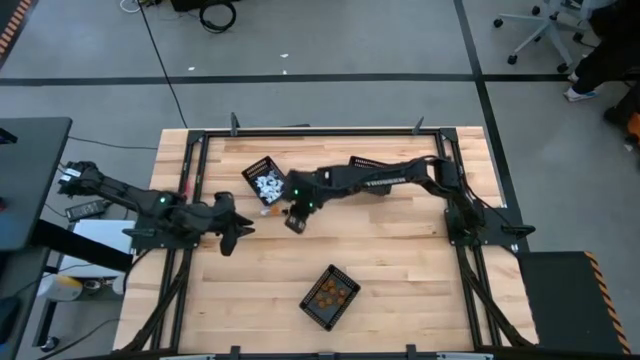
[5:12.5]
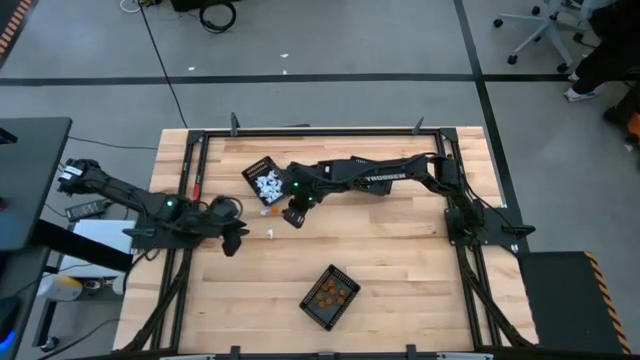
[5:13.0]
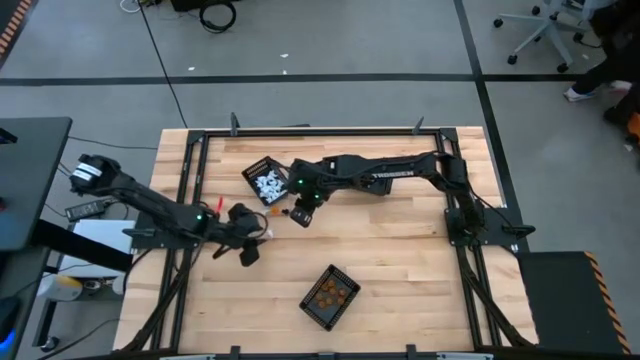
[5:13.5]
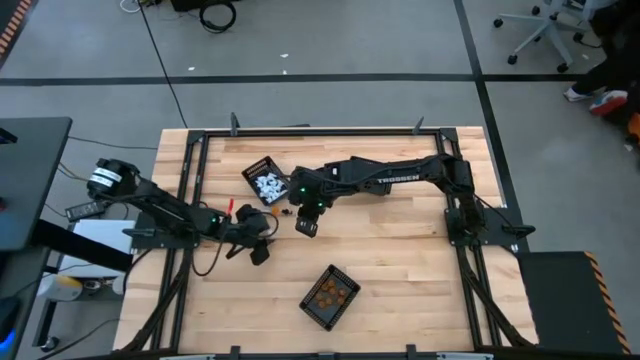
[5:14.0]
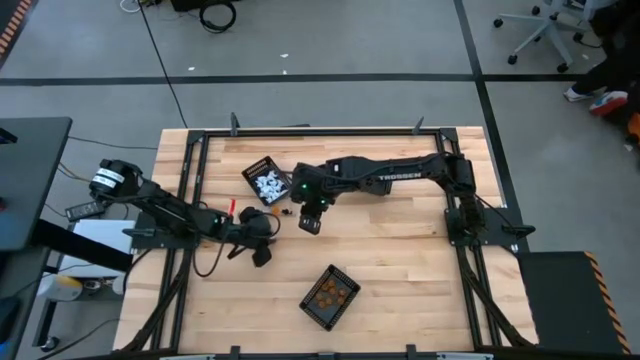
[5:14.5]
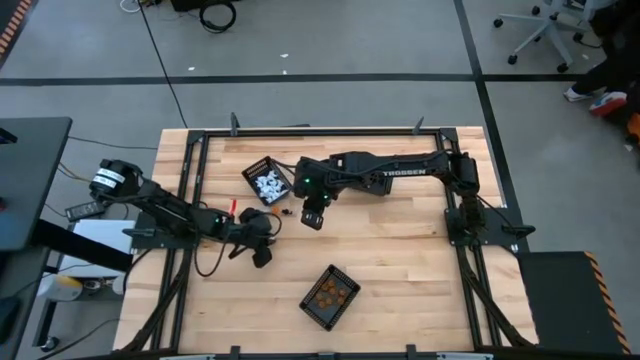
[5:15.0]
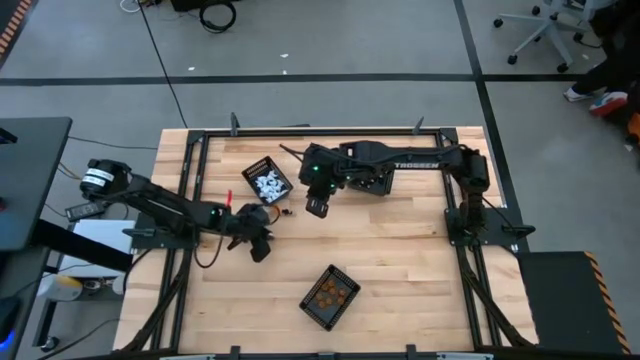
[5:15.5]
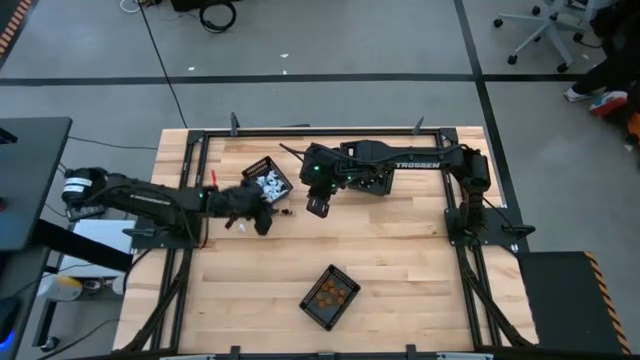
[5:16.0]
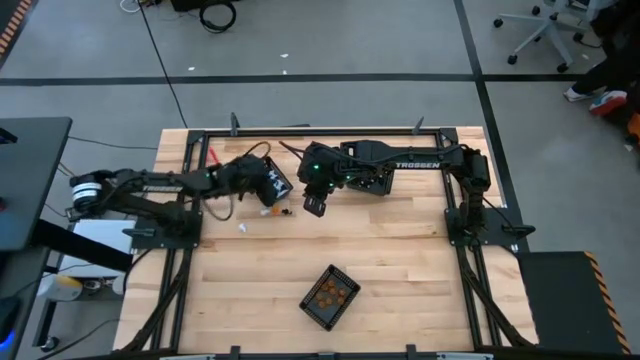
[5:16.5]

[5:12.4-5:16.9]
Task: Sort Halloween decoration
Put the white ghost toy into the top left black basket

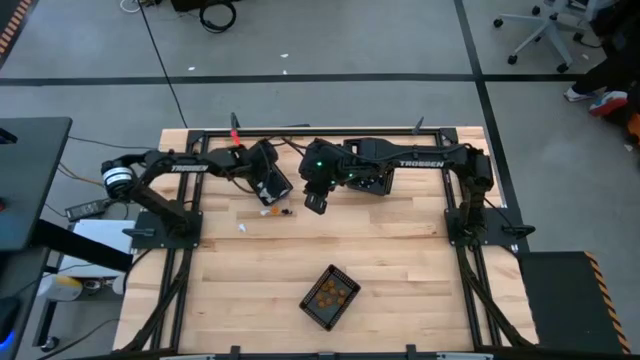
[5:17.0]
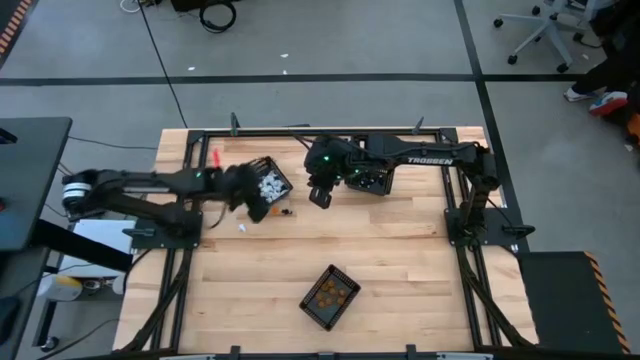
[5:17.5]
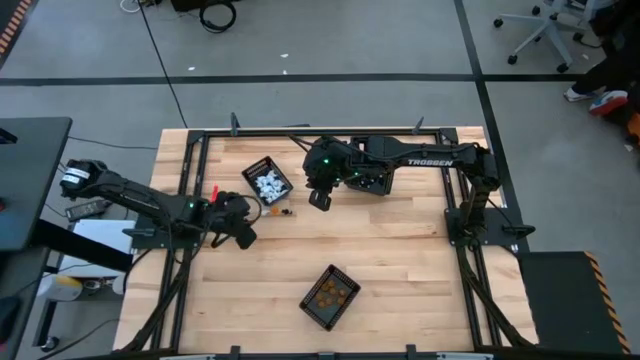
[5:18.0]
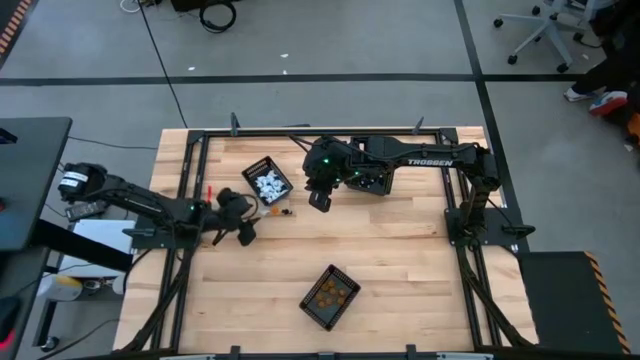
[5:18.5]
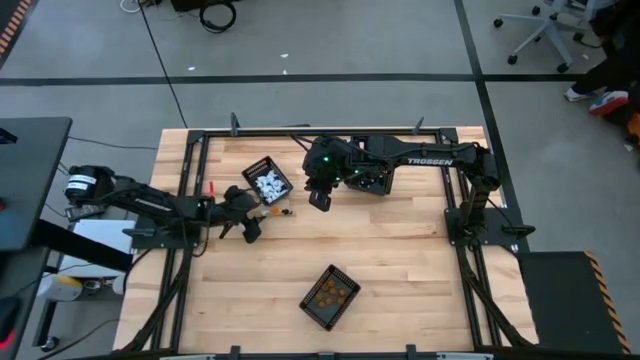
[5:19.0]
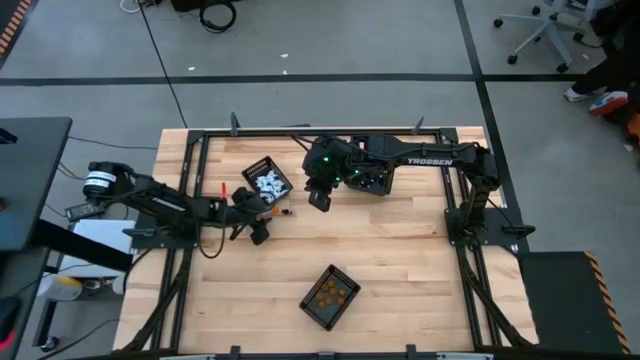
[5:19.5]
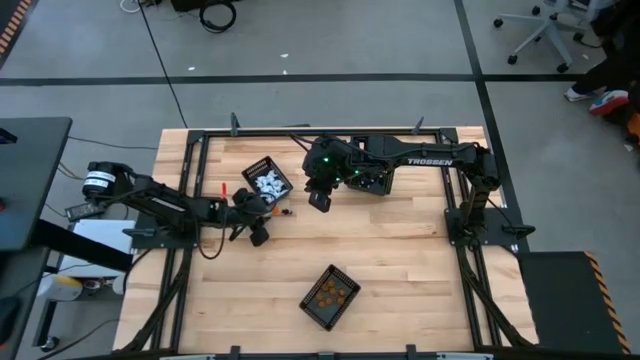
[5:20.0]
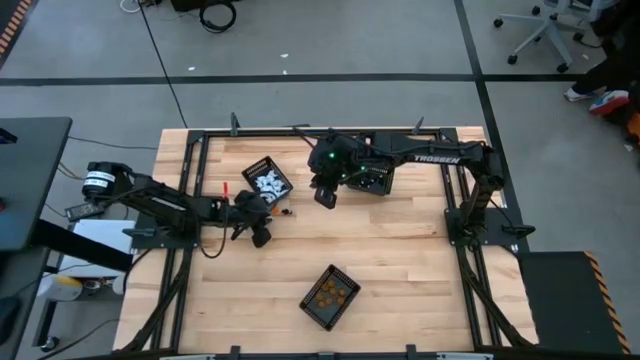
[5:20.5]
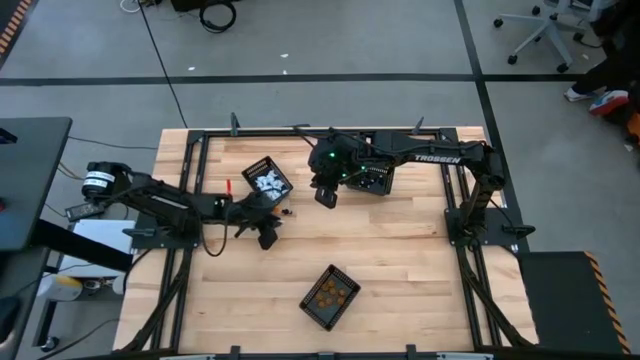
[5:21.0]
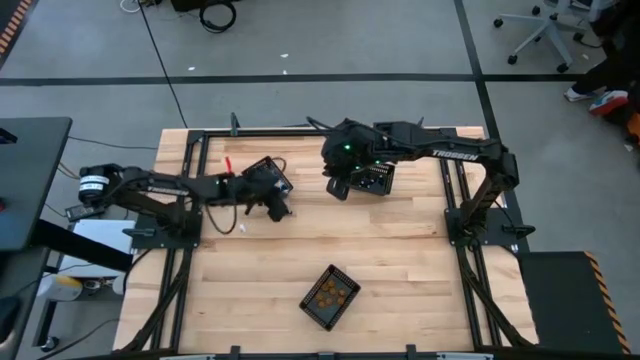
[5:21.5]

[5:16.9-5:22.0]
Put the white ghost toy into the top left black basket

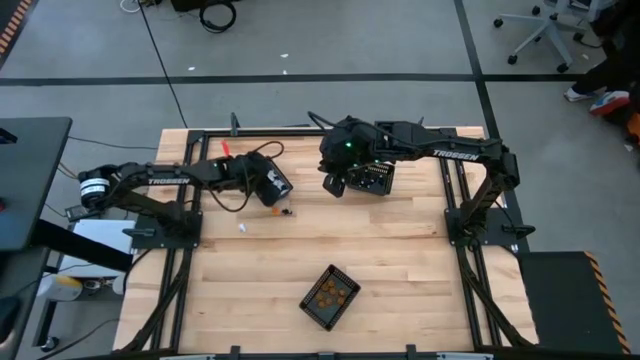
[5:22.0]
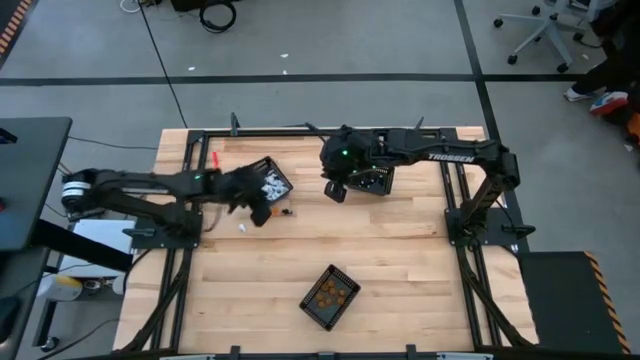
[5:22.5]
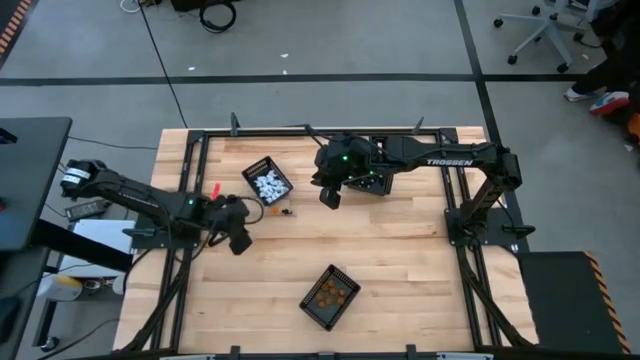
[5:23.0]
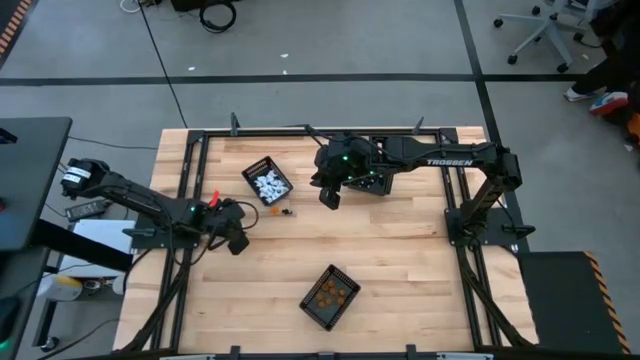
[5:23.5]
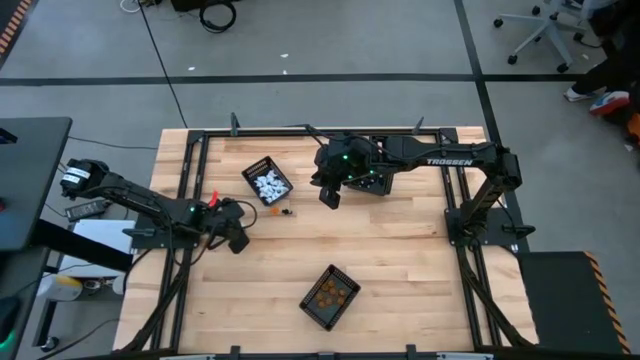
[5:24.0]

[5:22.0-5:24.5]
Put the white ghost toy into the top left black basket

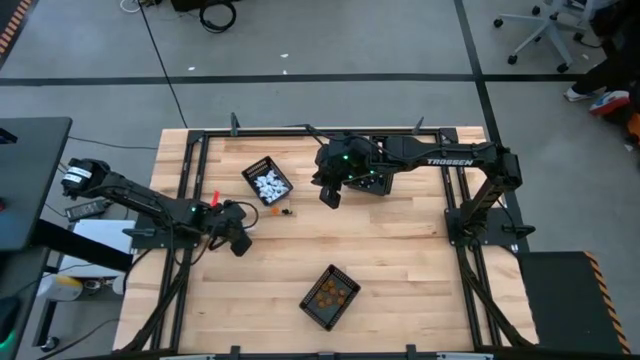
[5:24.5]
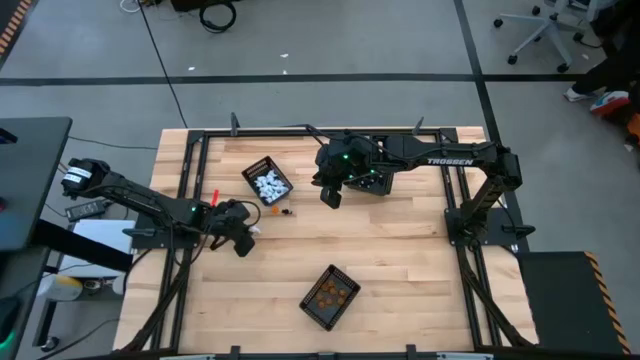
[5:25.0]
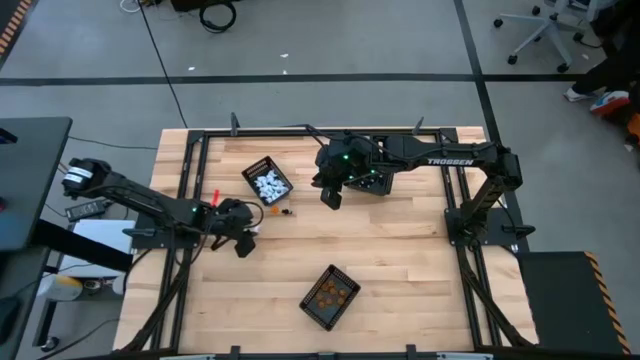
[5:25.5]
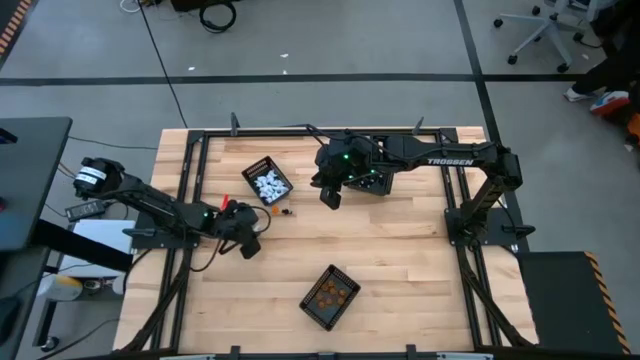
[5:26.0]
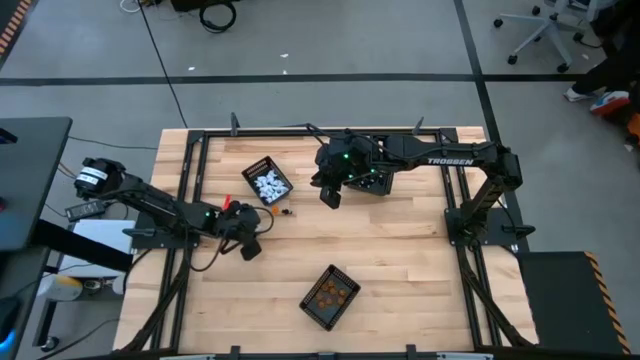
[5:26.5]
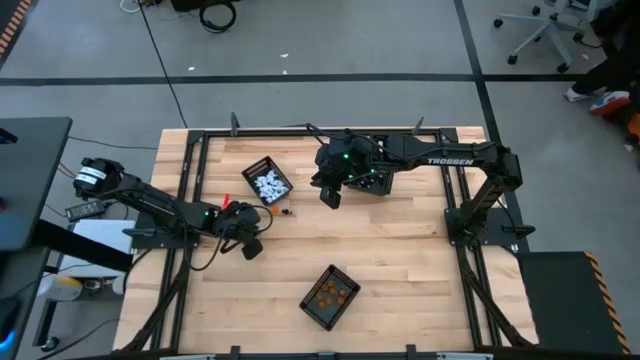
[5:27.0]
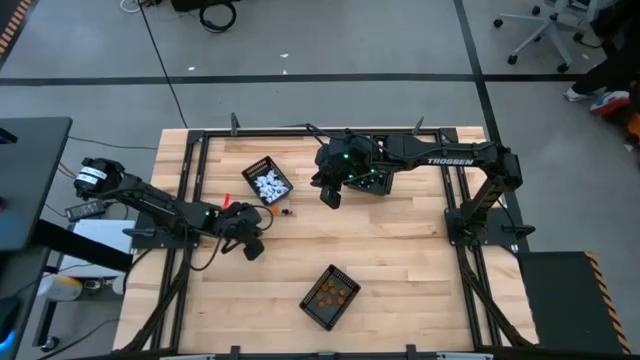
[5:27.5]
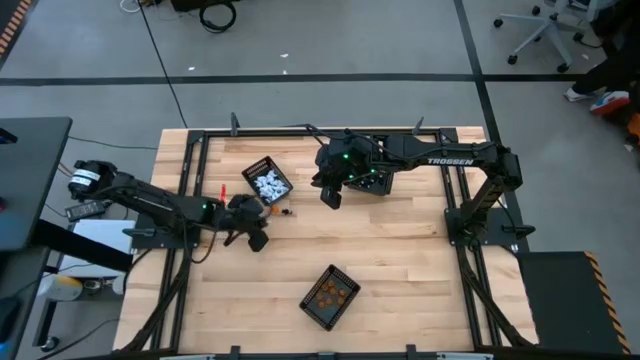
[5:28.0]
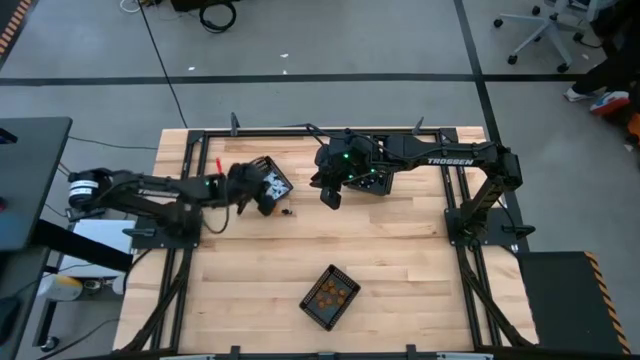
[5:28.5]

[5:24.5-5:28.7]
Put the white ghost toy into the top left black basket

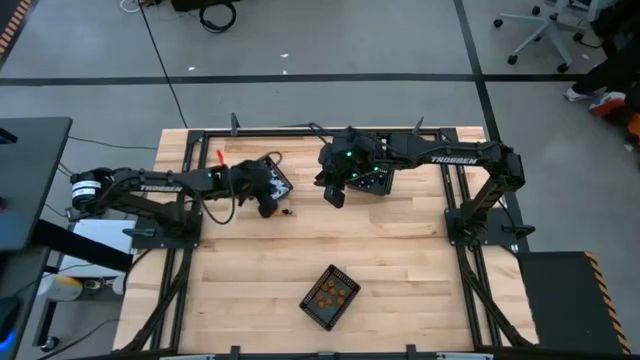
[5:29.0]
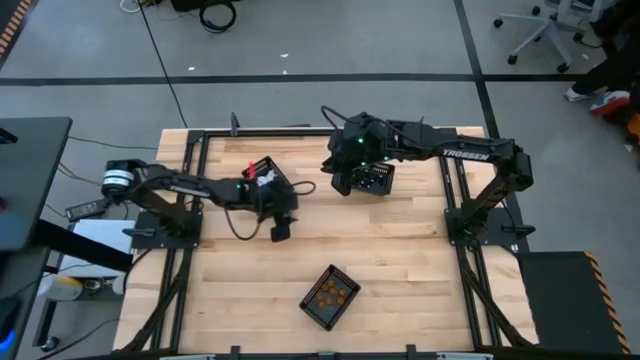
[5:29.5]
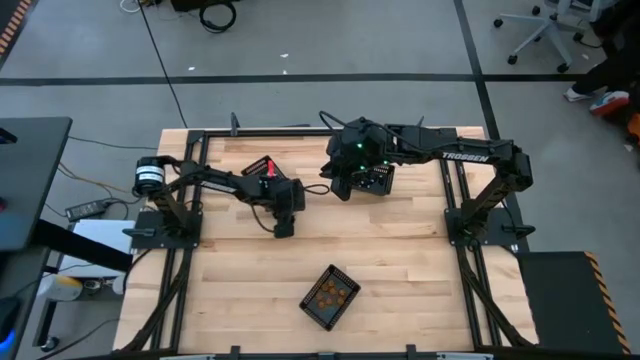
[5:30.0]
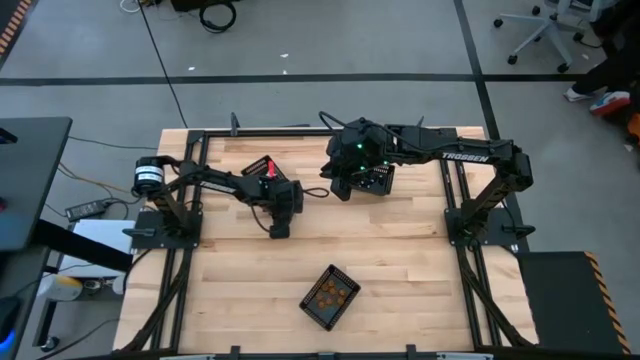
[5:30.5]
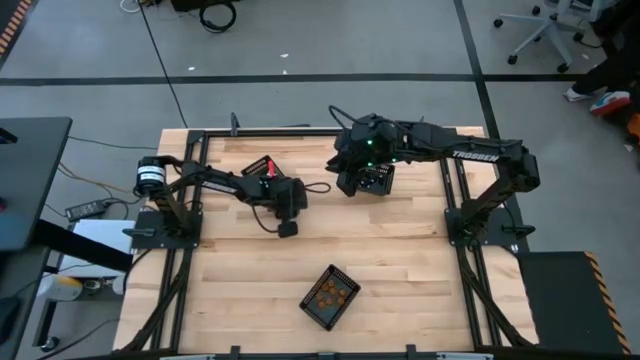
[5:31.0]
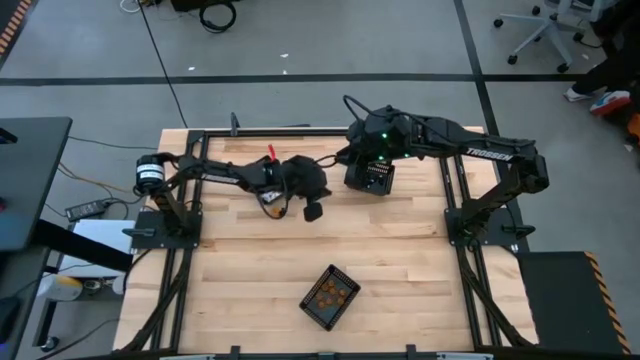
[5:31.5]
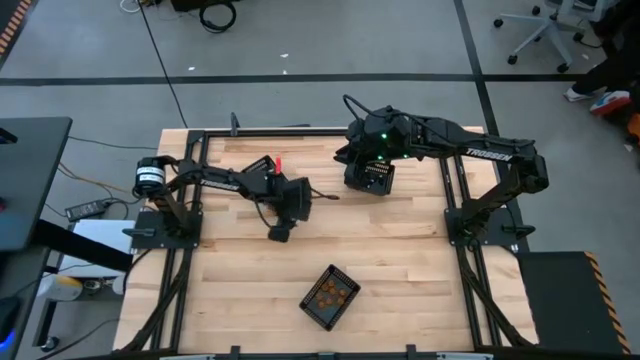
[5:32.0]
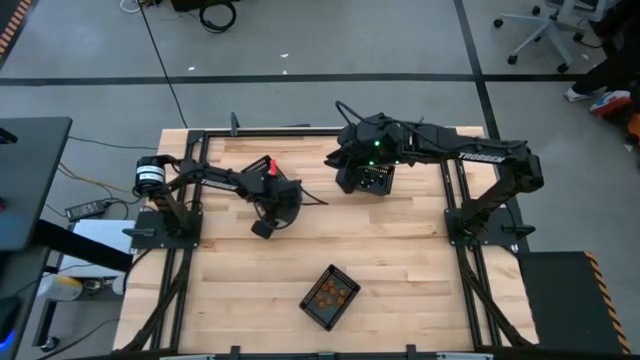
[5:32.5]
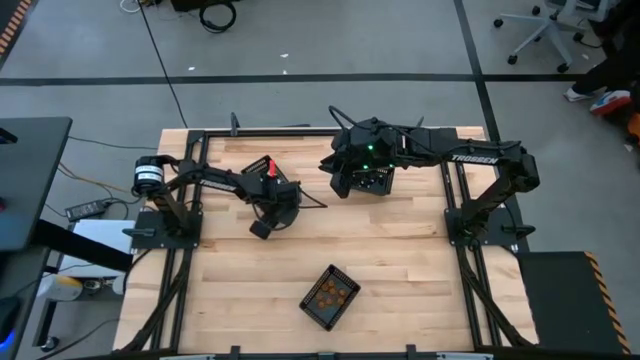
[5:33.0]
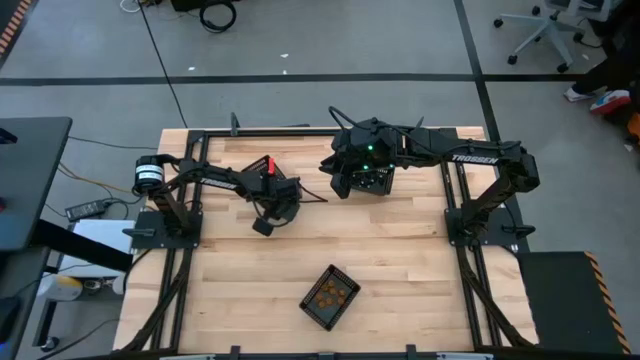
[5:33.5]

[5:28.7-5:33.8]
Put the black skeleton toy into the top right black basket
